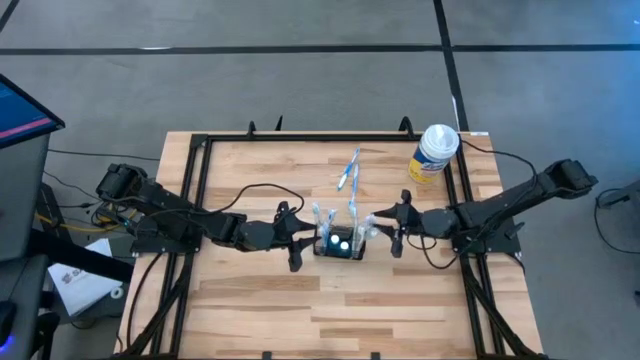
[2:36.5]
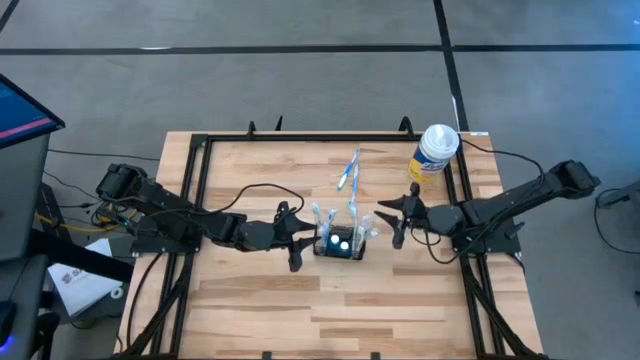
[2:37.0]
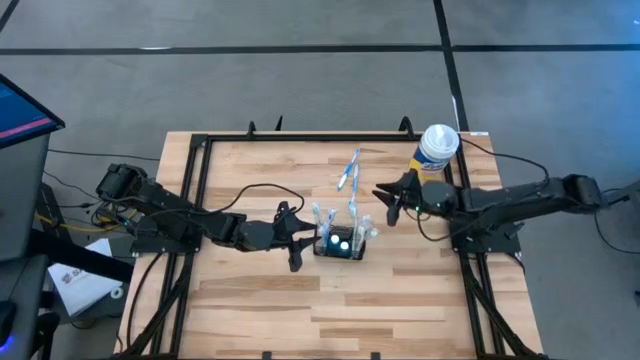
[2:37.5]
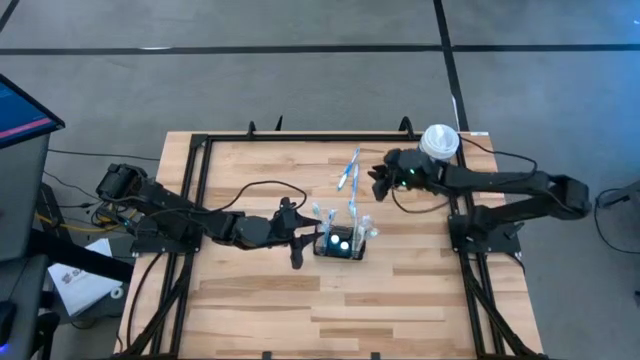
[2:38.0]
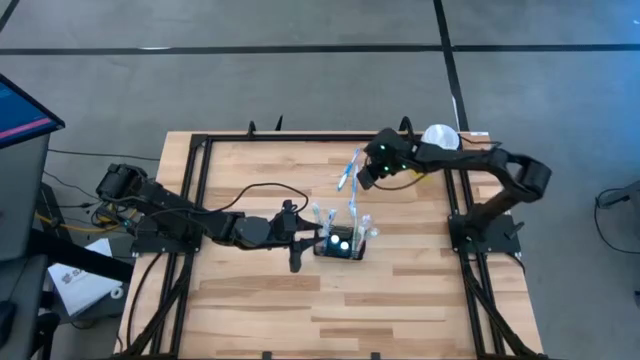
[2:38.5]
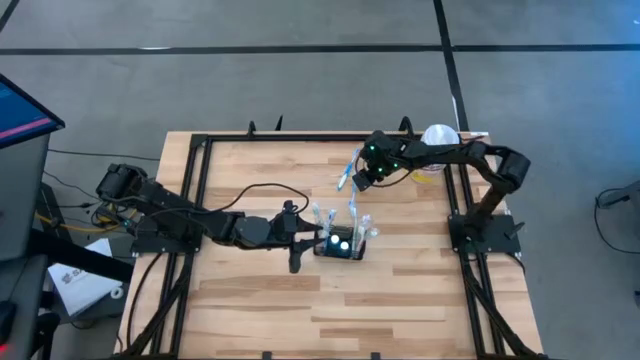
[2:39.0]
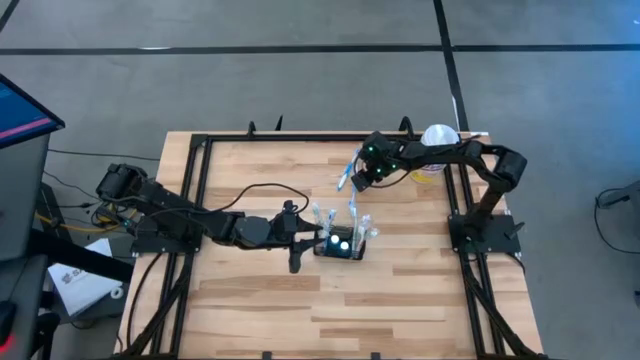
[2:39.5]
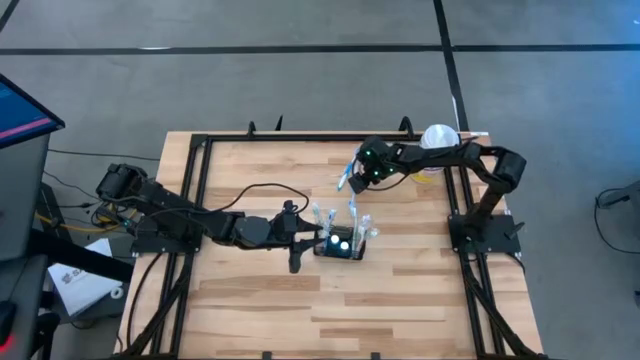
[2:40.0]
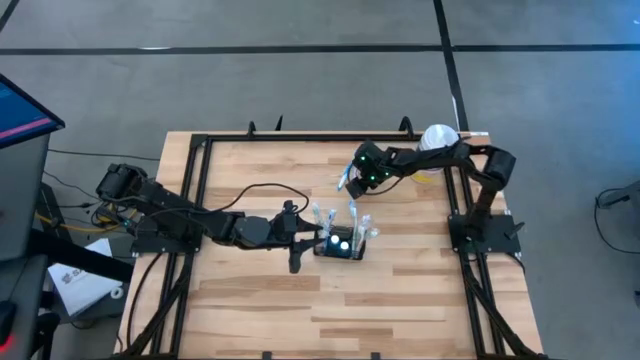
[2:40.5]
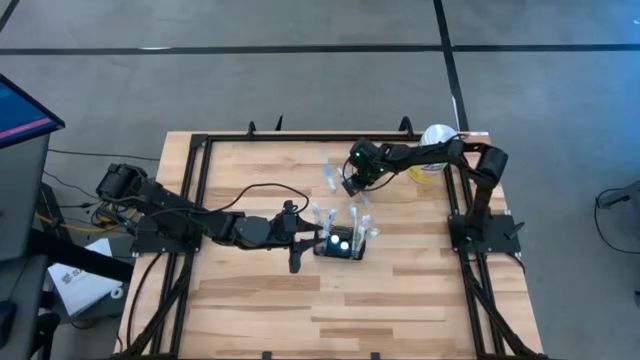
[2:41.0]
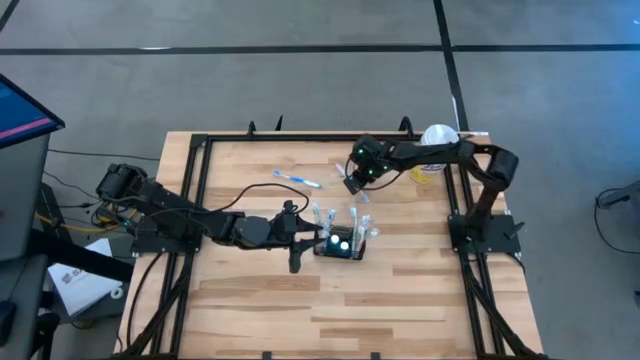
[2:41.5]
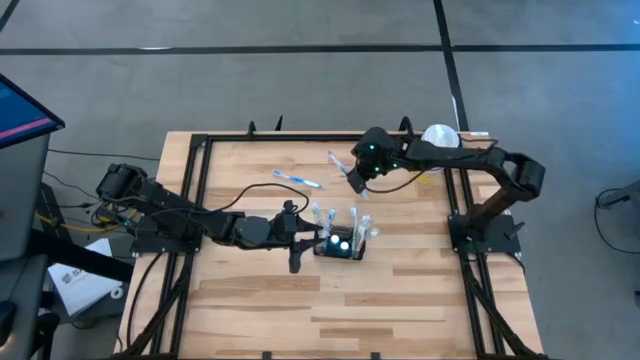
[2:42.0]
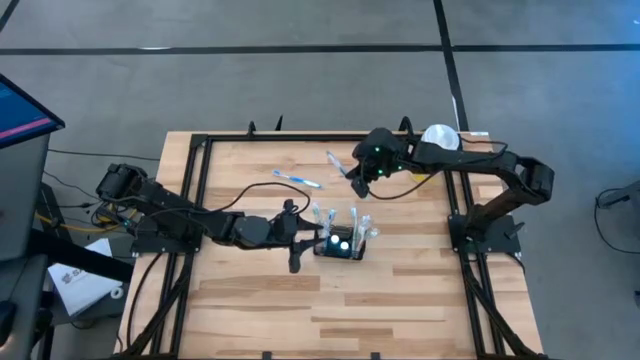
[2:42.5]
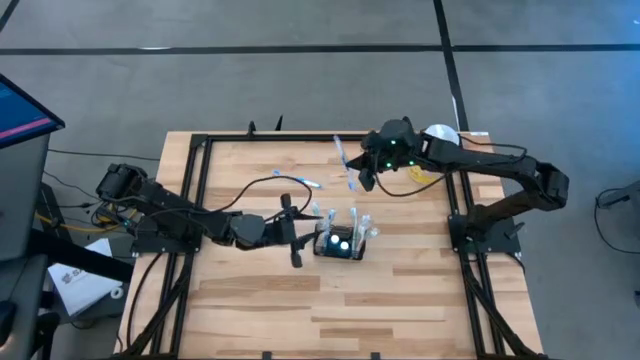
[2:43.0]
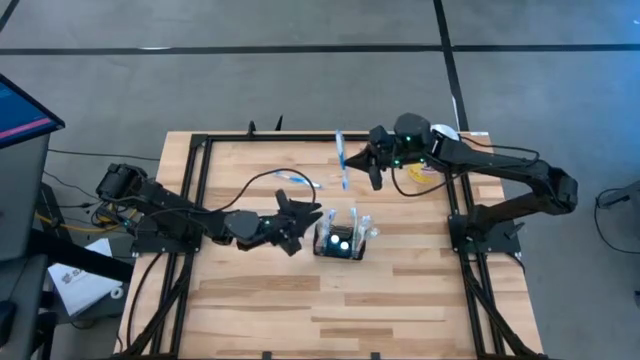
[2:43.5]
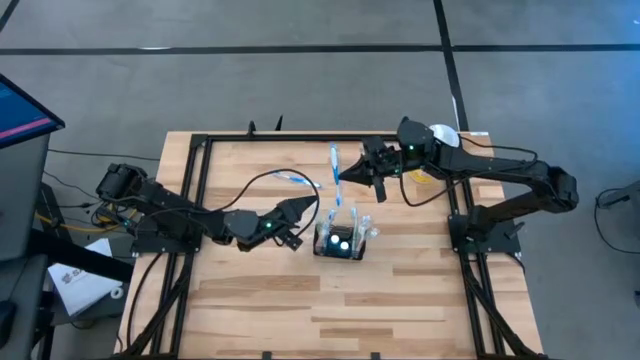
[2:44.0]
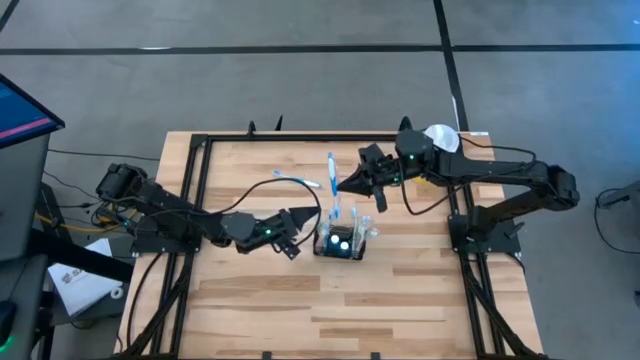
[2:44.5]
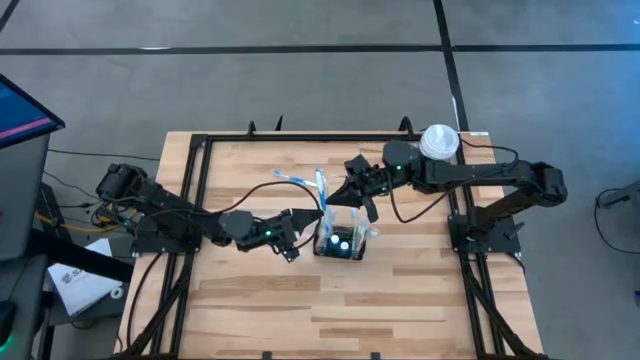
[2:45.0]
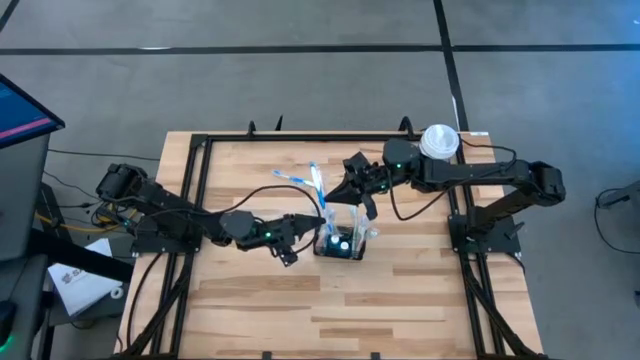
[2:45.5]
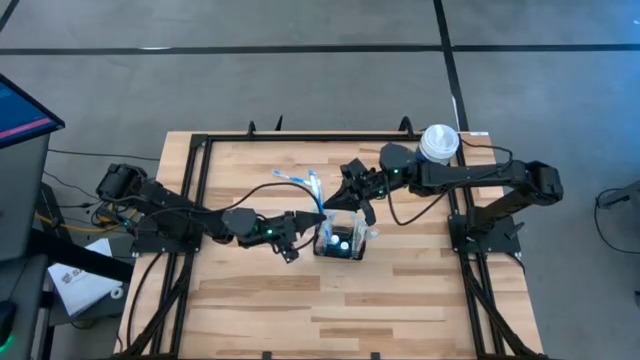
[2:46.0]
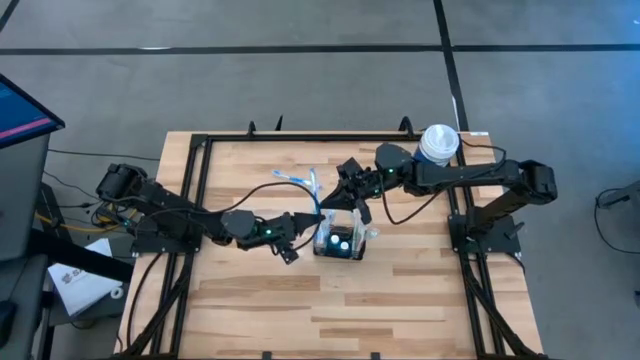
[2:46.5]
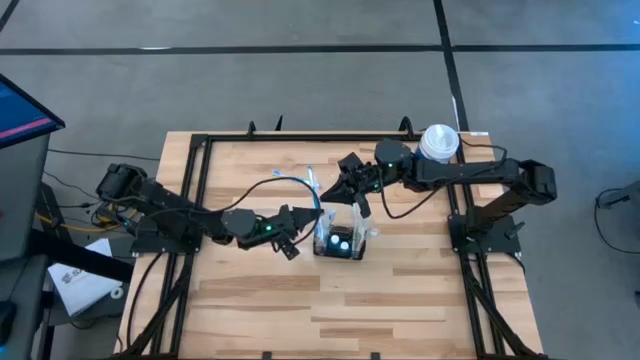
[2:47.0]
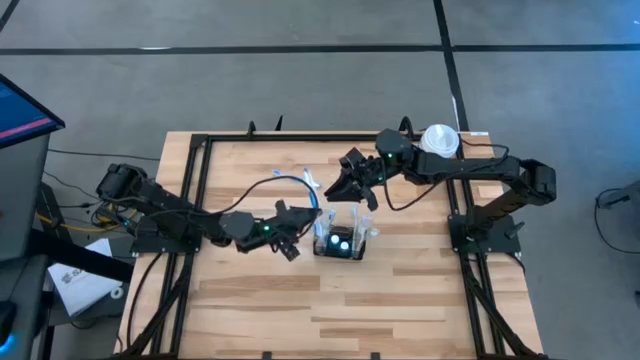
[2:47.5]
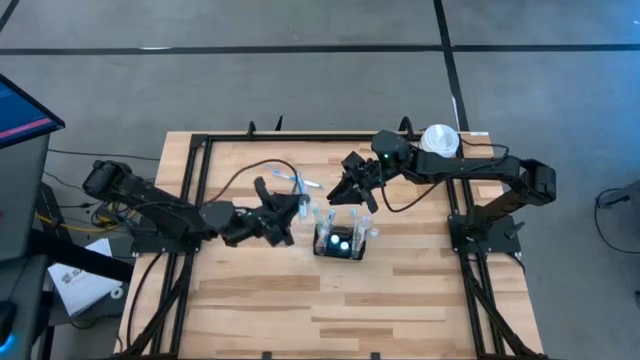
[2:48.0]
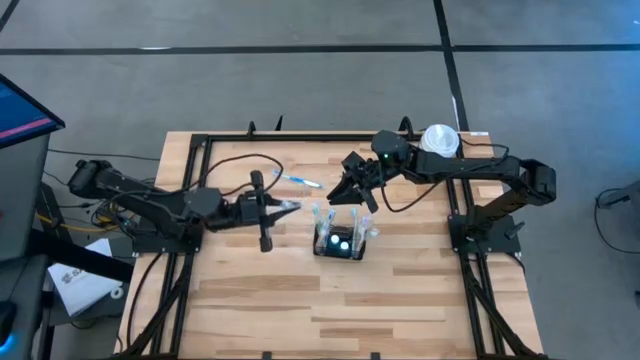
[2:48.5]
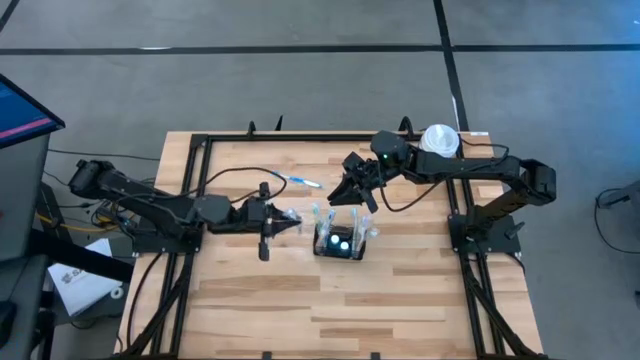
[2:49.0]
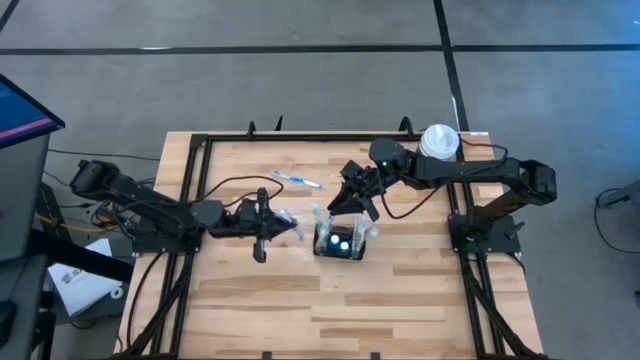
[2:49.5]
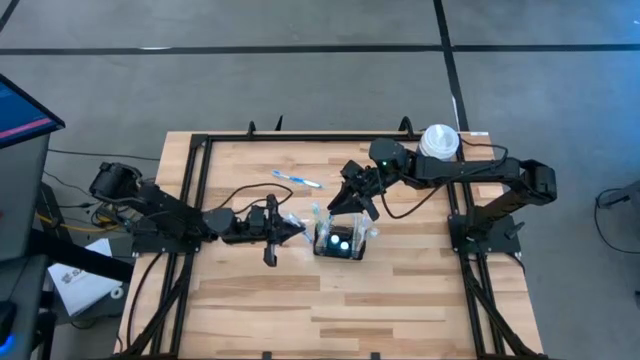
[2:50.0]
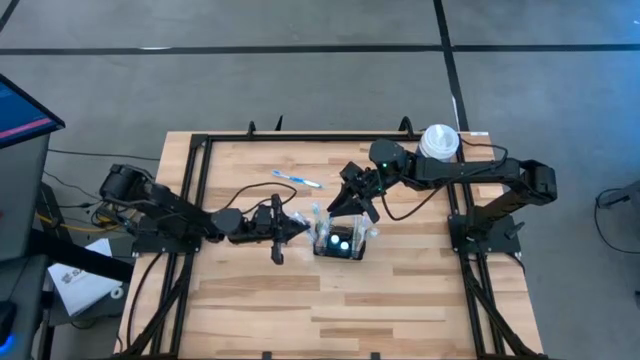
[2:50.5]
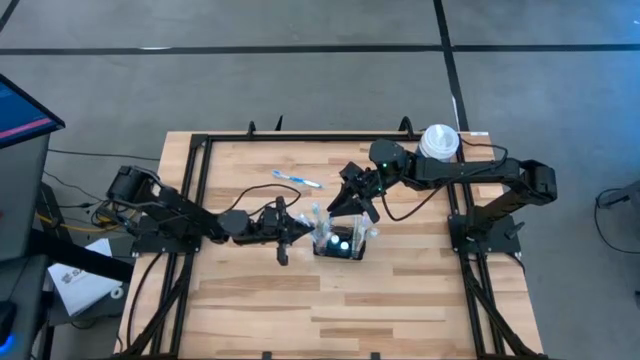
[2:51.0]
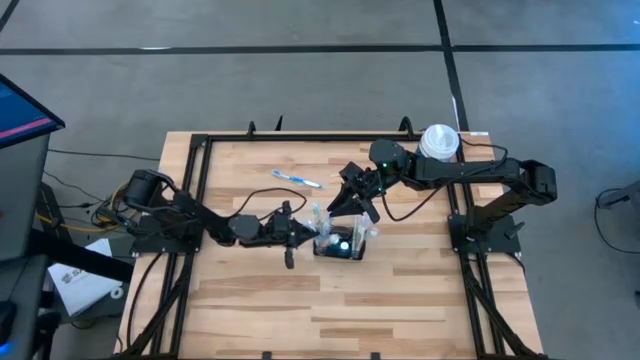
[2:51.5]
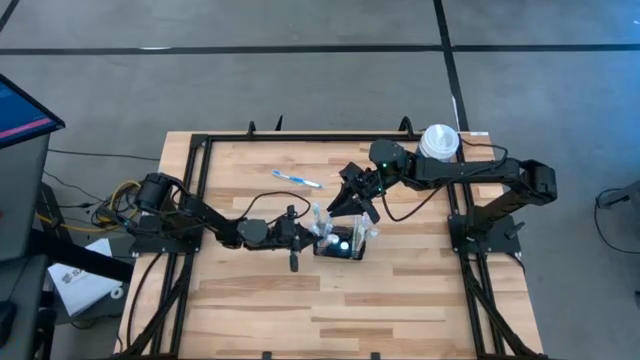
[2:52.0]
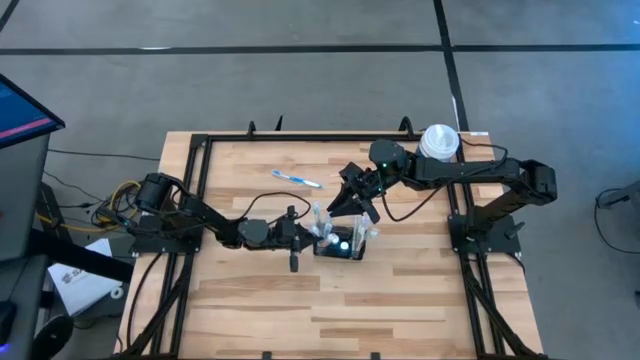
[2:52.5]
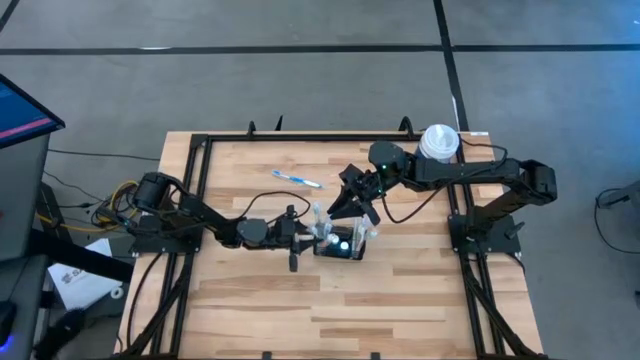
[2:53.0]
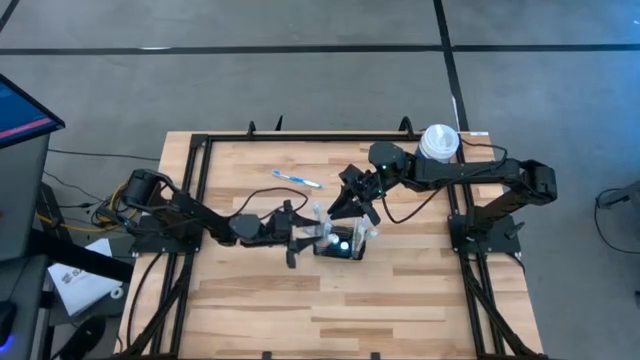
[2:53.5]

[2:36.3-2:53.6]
Task: Pick & Place toothbrushing station
Put the blue toothbrush into the wire organizer
